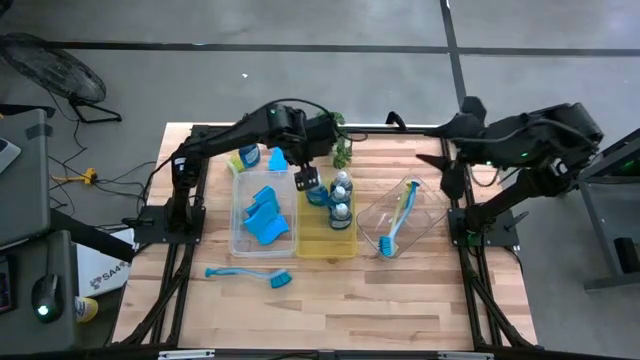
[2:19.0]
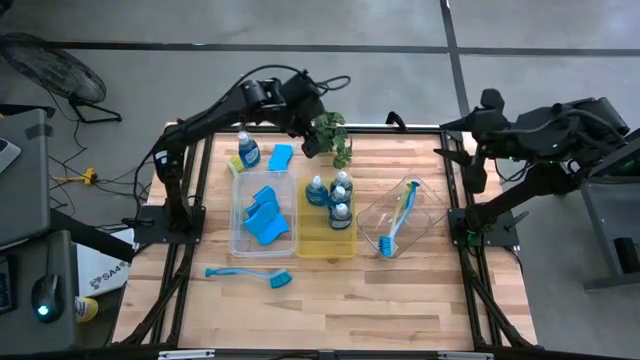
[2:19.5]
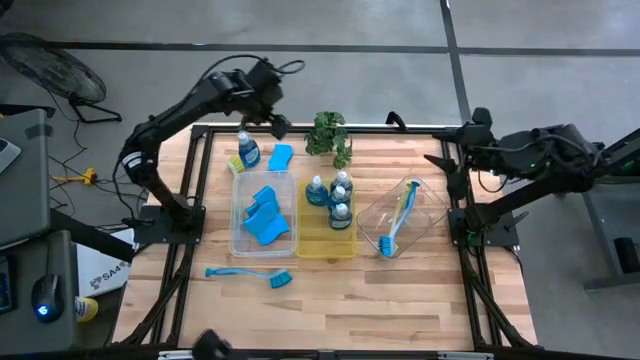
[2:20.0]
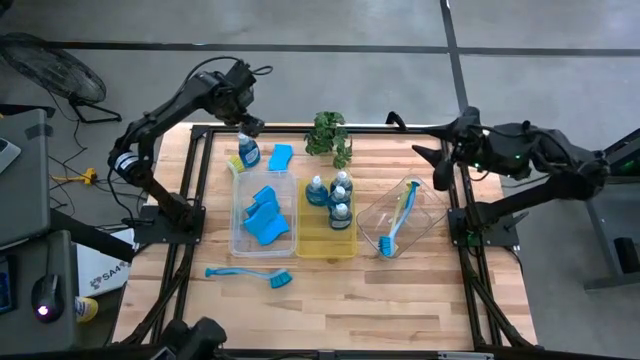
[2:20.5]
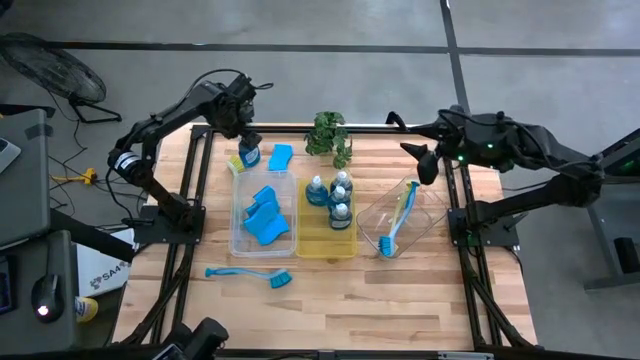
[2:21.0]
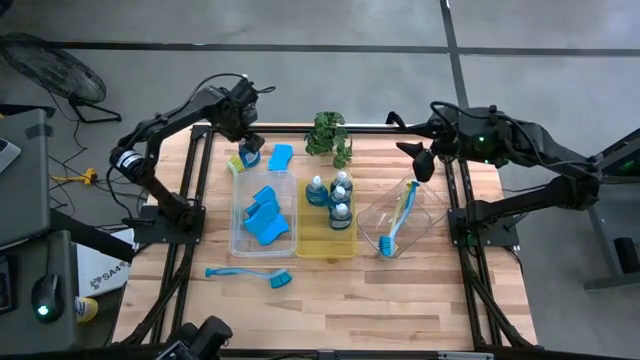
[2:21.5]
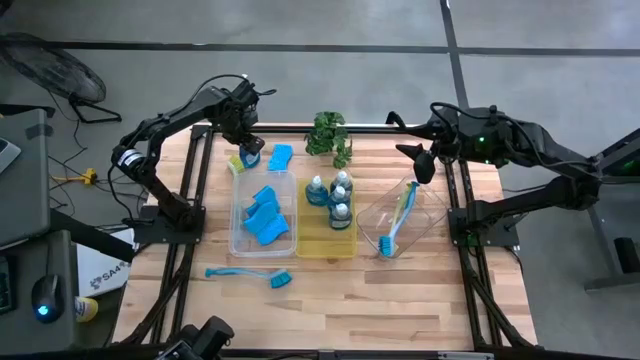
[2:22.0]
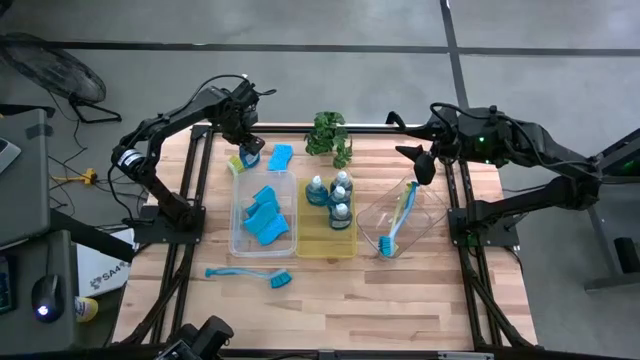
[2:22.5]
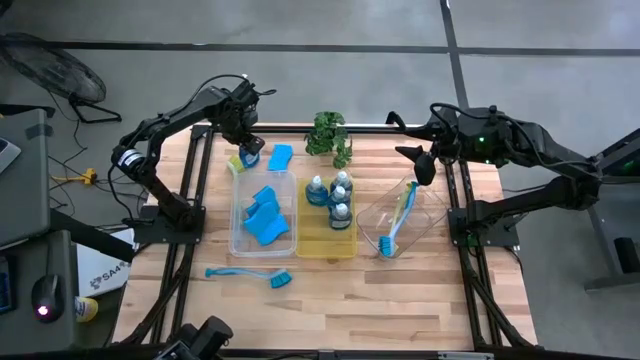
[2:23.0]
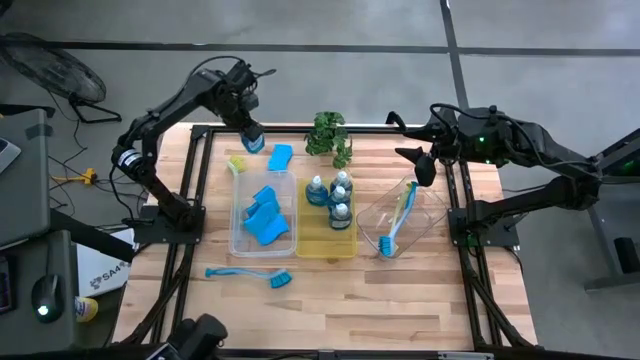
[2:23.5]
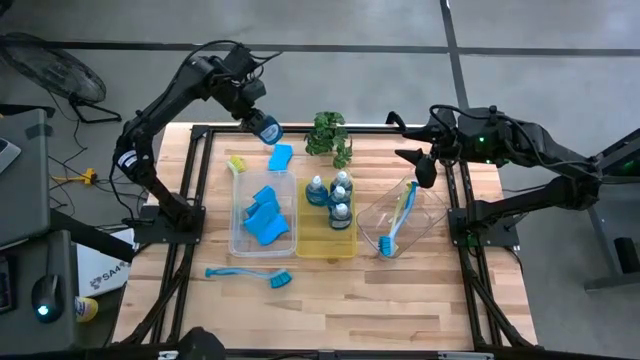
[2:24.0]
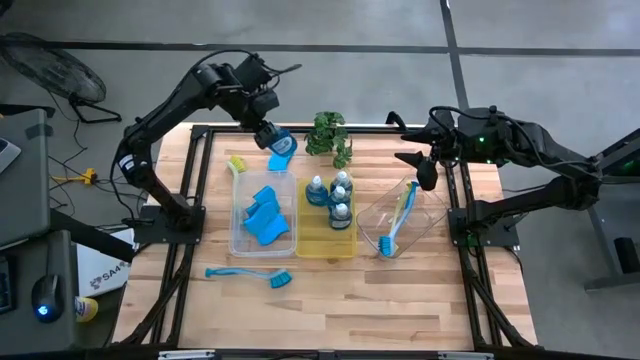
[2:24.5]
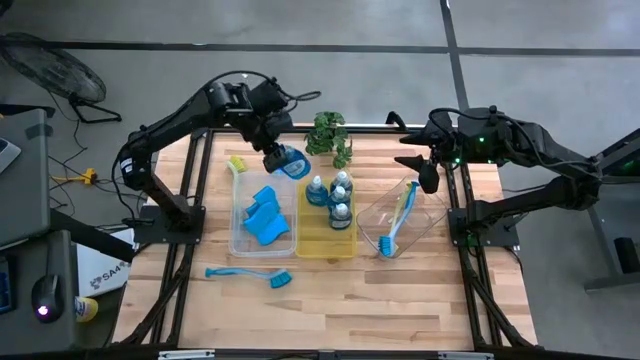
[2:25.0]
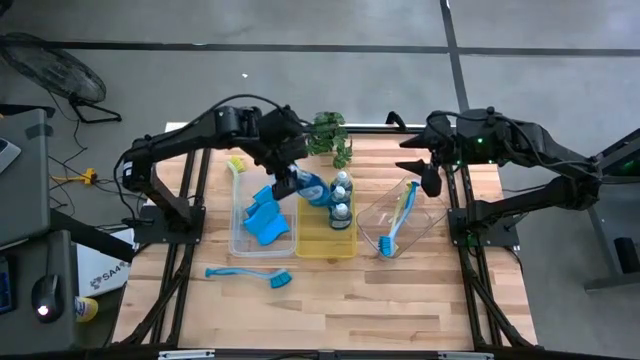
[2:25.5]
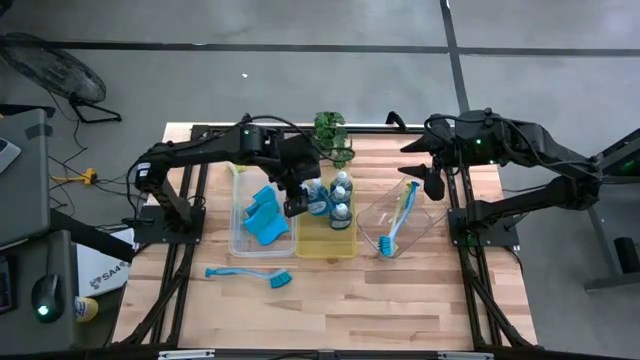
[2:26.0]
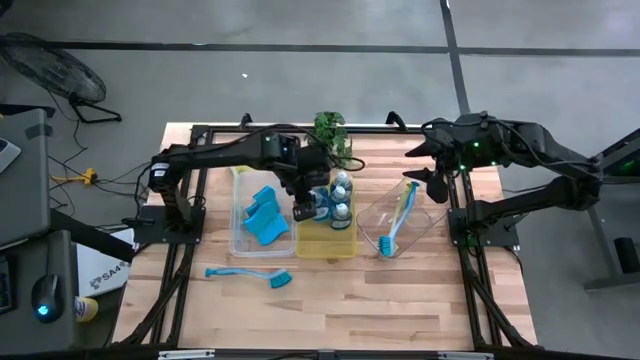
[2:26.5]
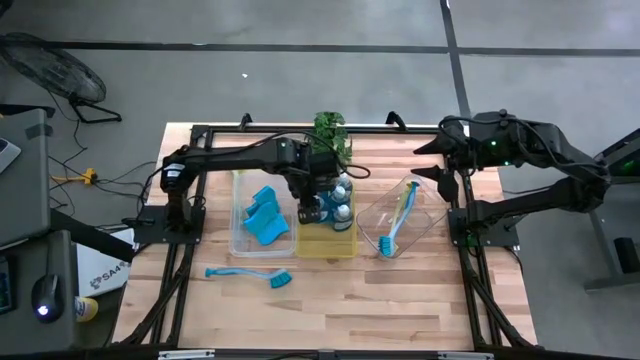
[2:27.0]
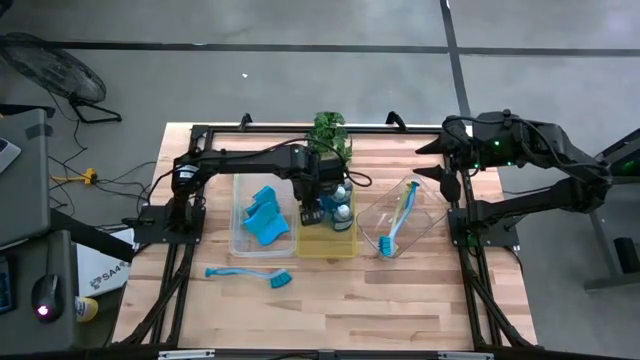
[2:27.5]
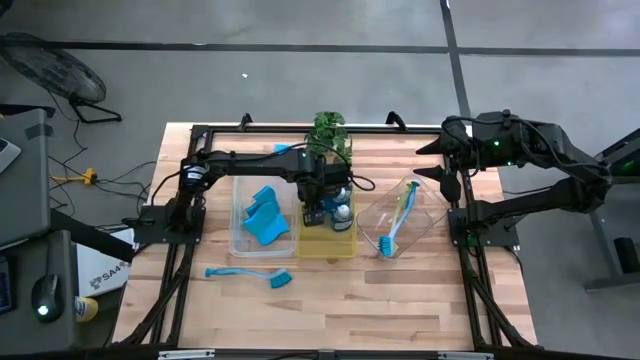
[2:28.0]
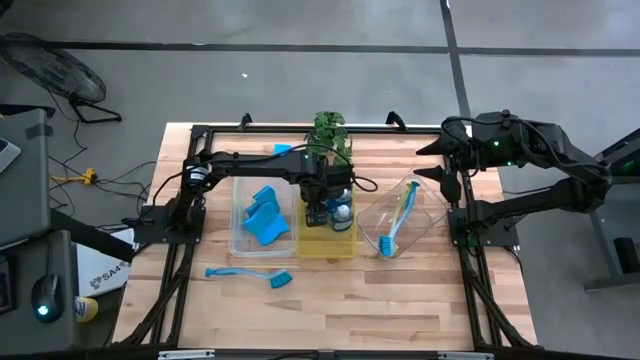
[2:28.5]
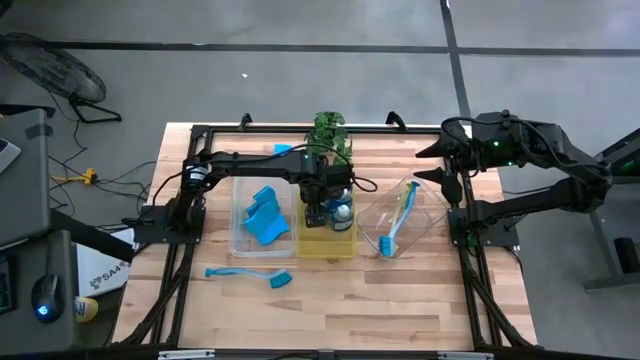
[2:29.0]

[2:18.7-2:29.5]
Task: Pick & Place Kitchen Sink Supplies
Put the dishwashing liquid bottle into the yellow bin

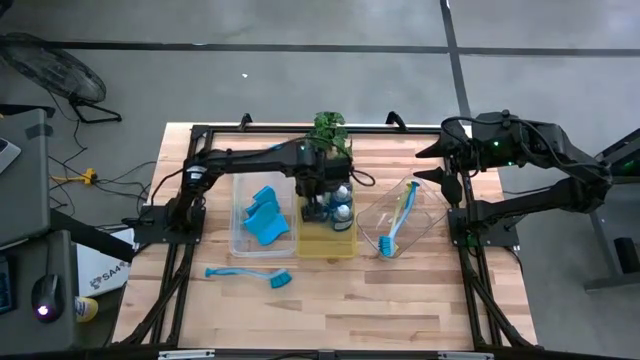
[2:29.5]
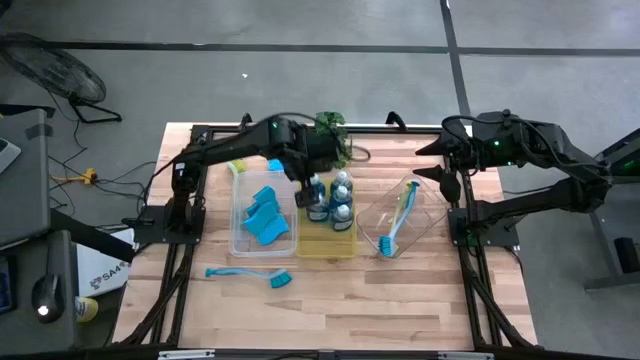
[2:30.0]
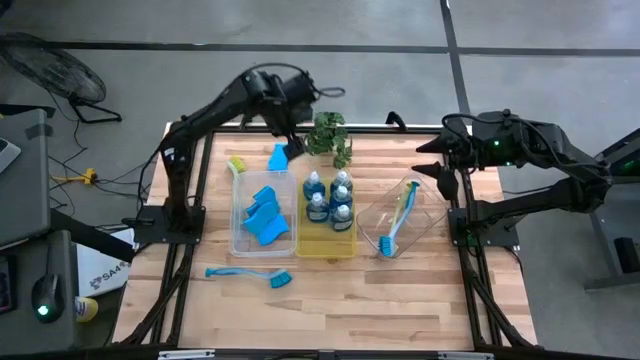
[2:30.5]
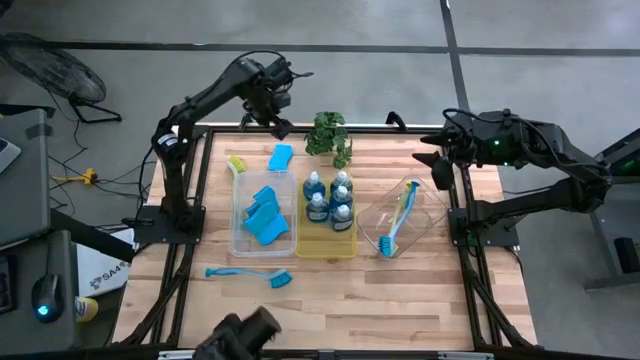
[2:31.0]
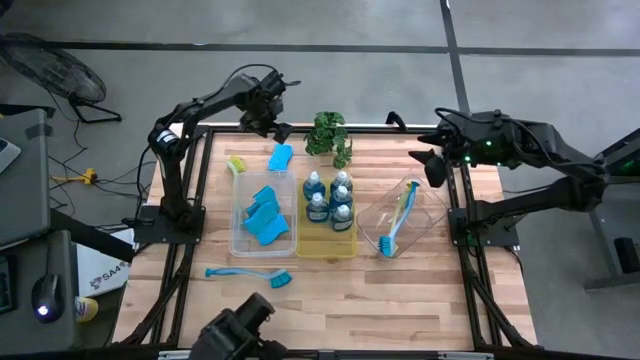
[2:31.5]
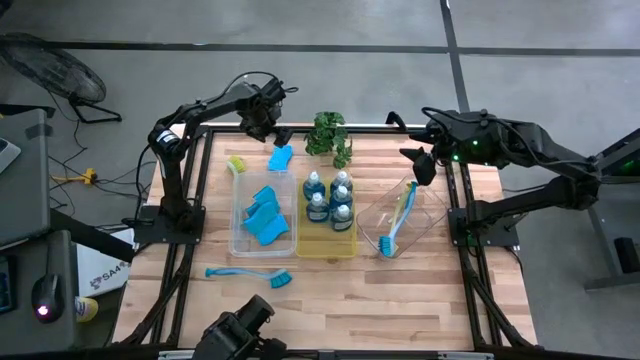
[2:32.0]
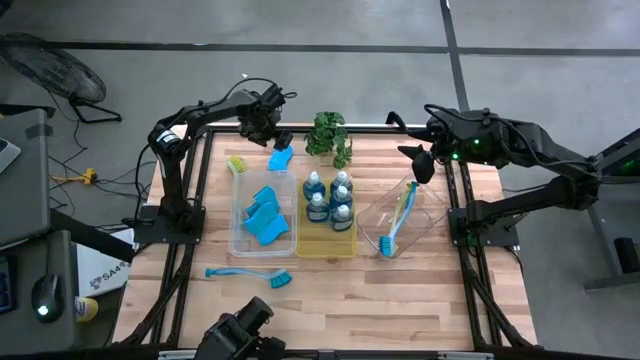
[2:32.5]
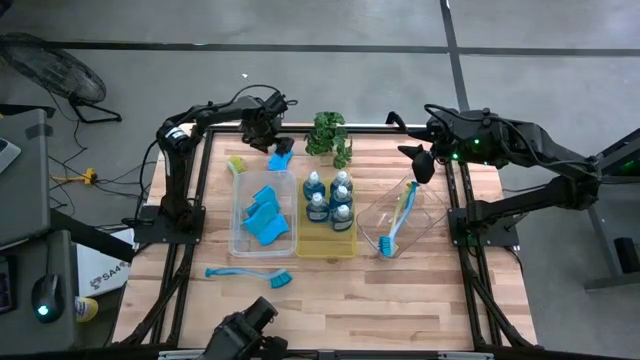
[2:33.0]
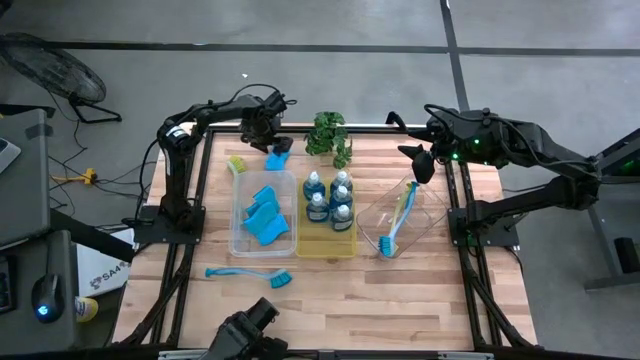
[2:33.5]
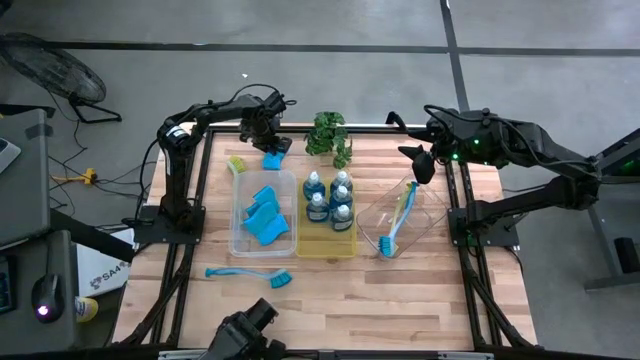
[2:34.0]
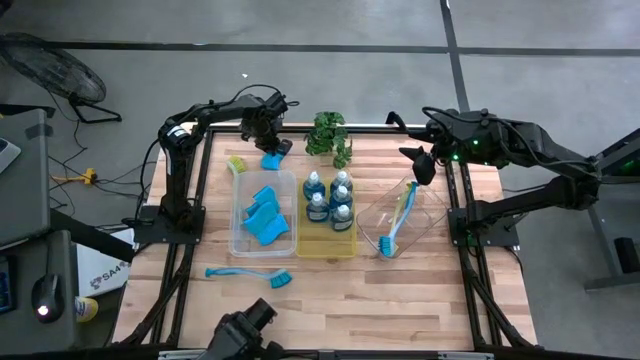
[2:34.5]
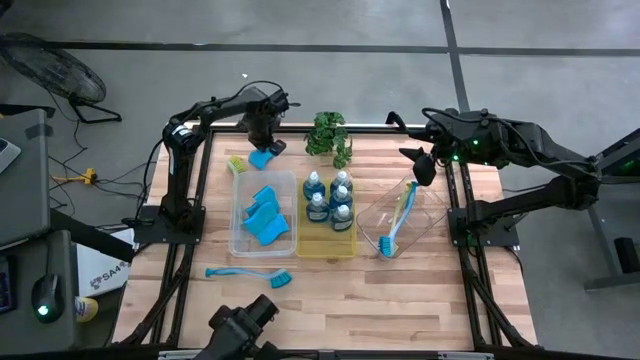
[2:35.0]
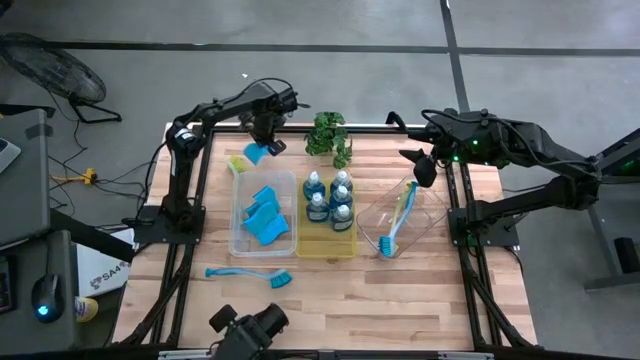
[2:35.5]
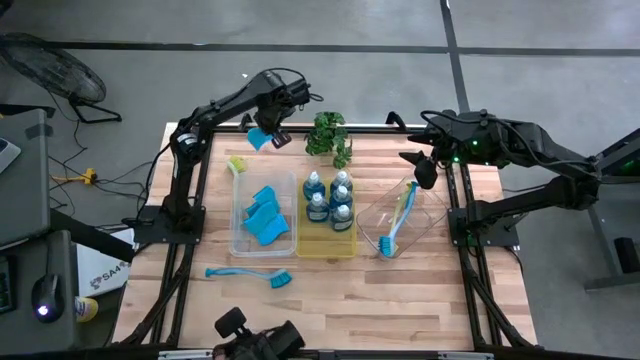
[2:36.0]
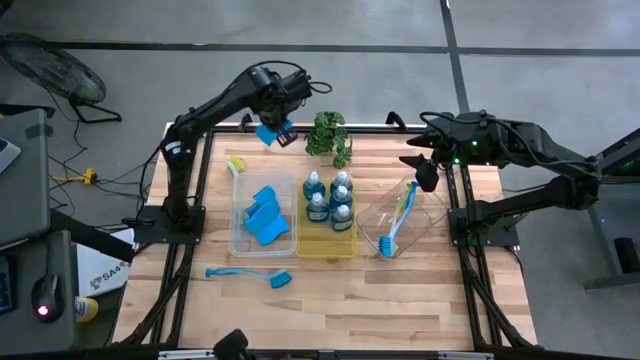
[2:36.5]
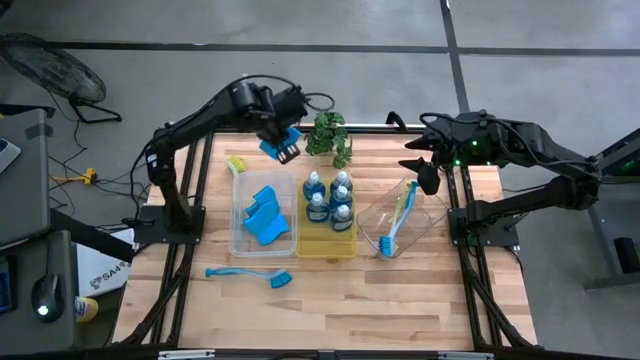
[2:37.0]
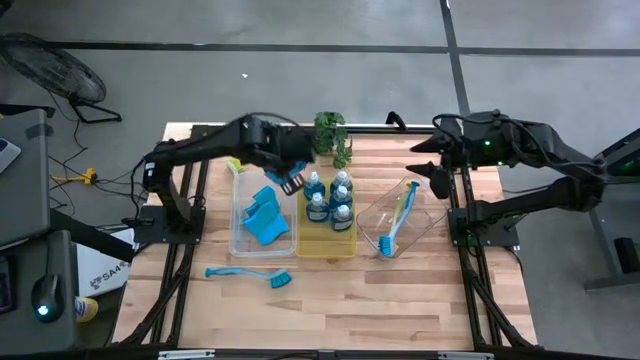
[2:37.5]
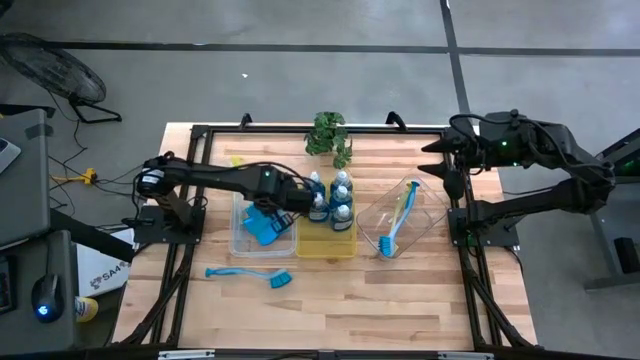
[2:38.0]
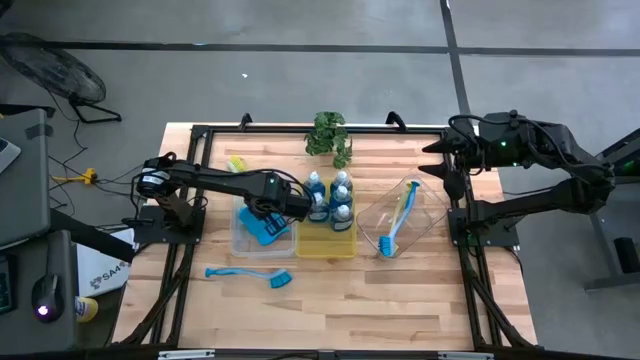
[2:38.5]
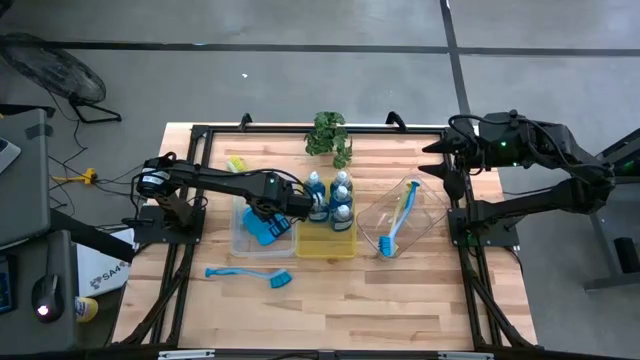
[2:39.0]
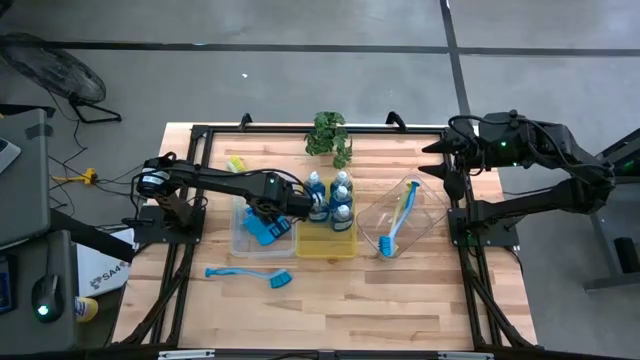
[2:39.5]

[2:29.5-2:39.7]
Put the blue sponge into the white bin
